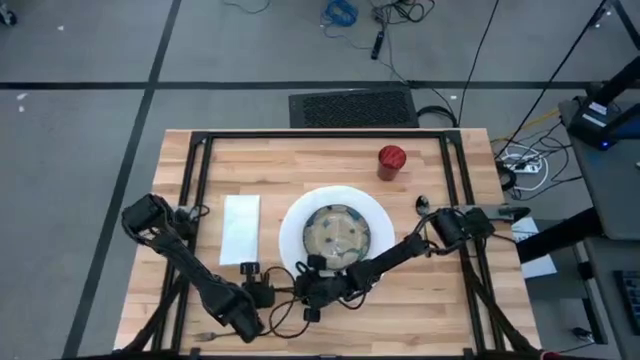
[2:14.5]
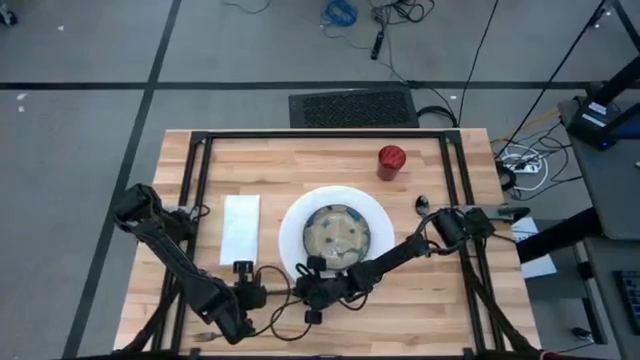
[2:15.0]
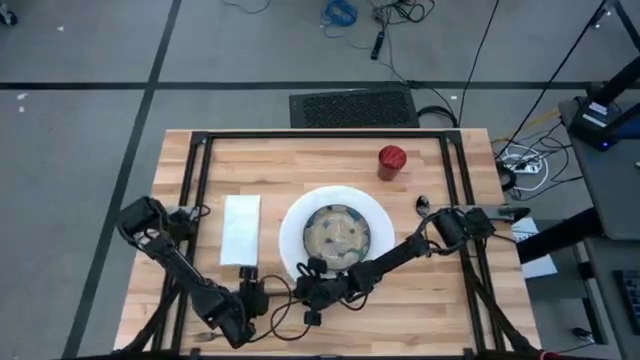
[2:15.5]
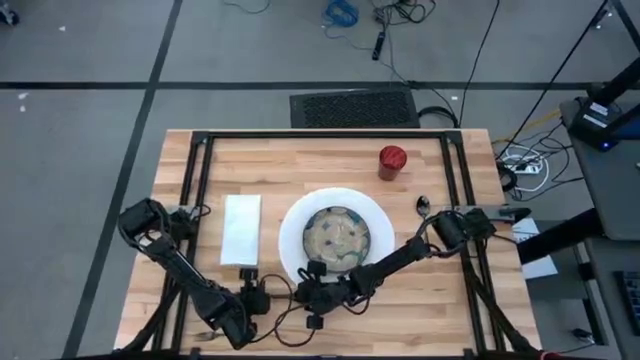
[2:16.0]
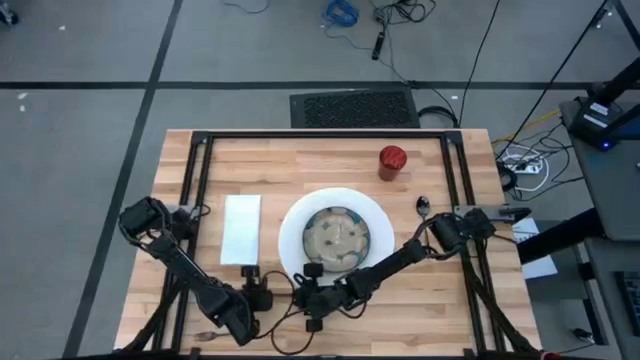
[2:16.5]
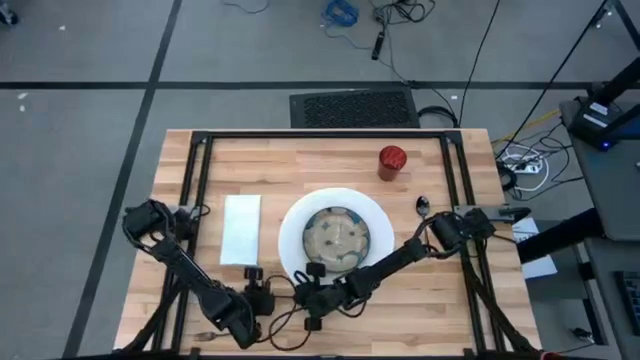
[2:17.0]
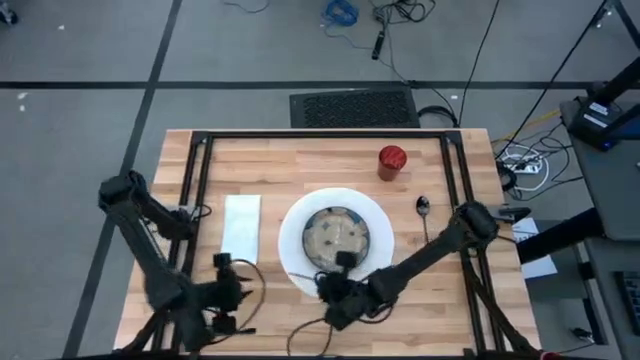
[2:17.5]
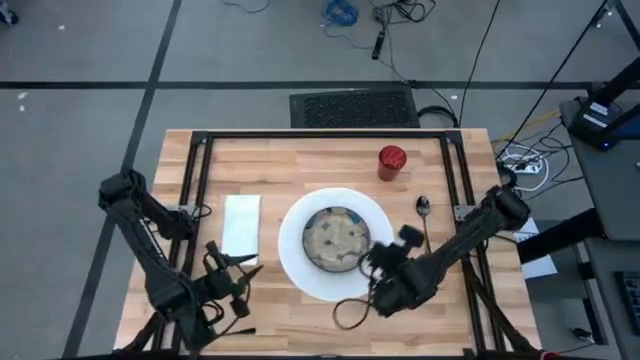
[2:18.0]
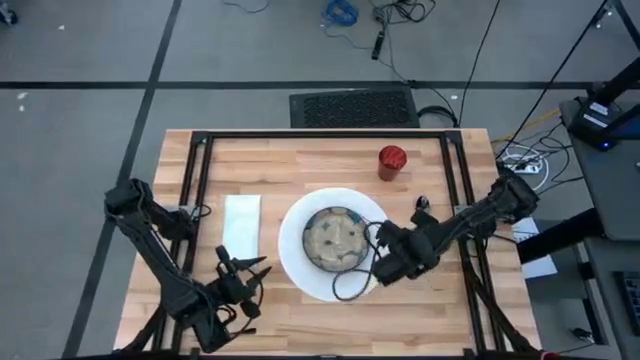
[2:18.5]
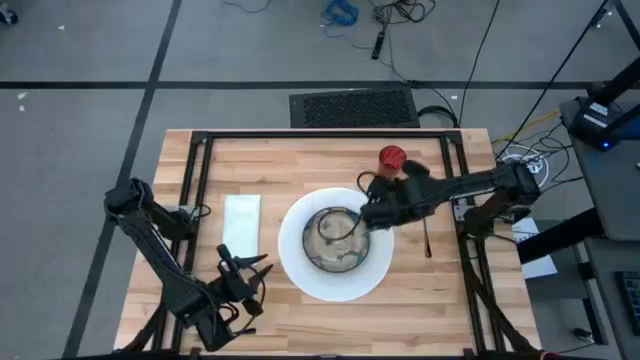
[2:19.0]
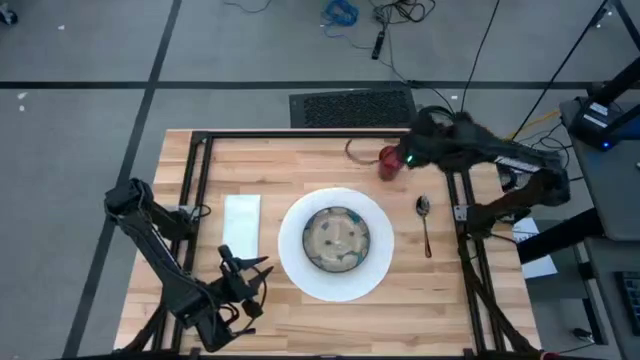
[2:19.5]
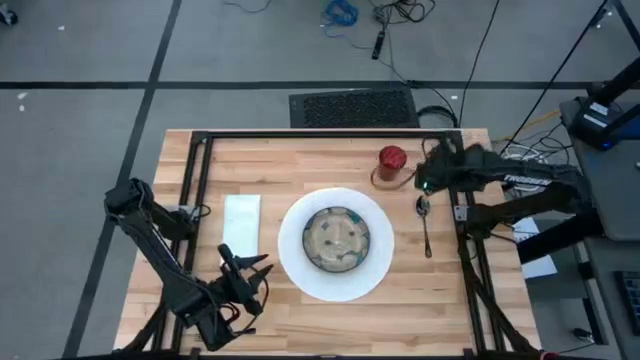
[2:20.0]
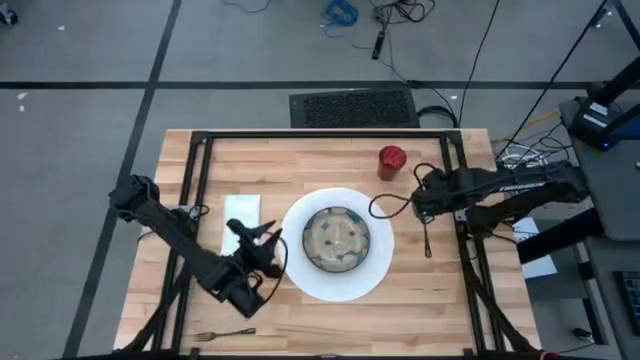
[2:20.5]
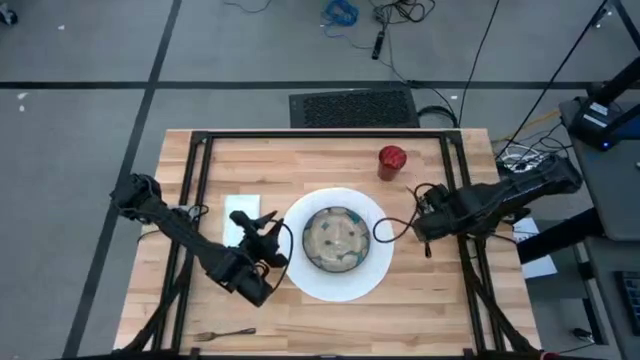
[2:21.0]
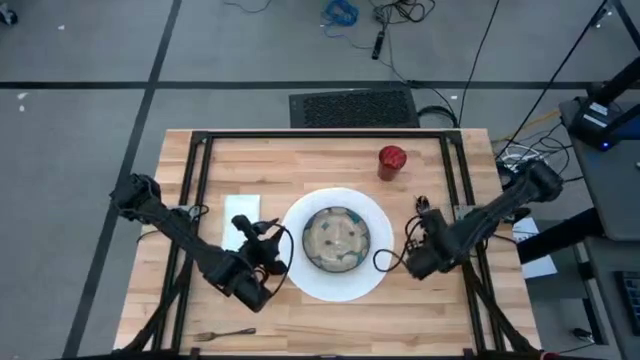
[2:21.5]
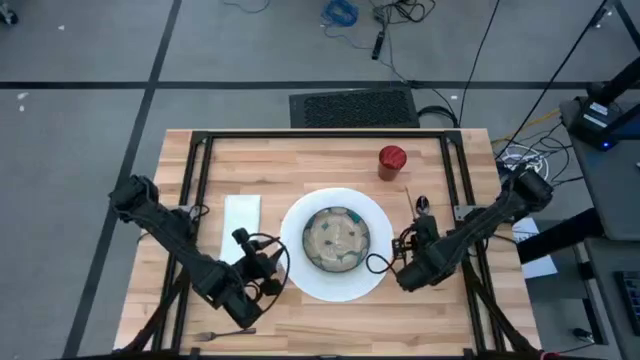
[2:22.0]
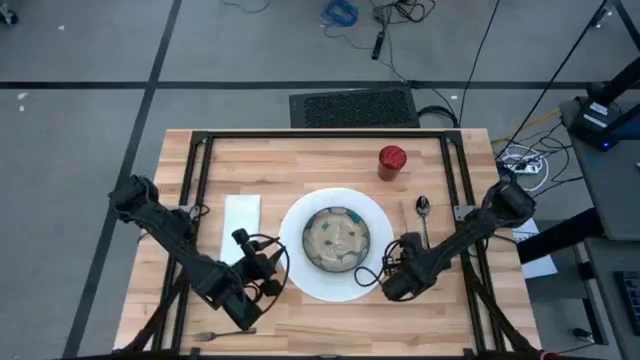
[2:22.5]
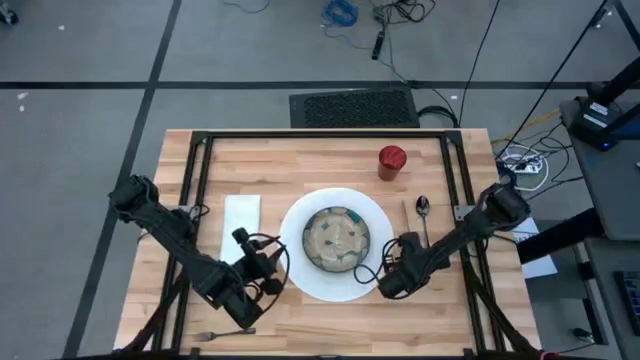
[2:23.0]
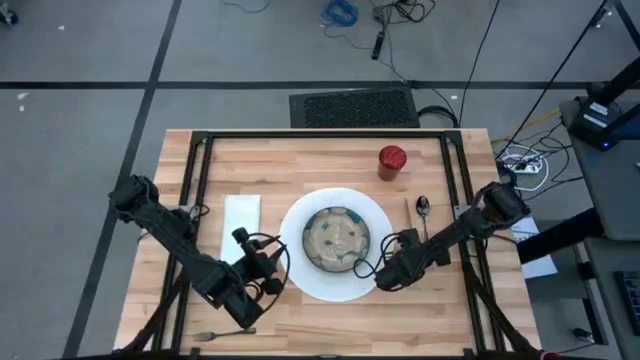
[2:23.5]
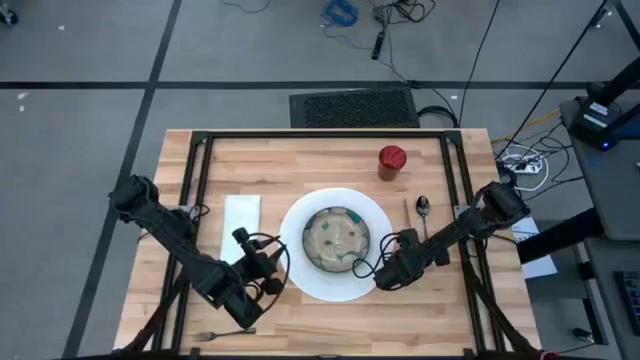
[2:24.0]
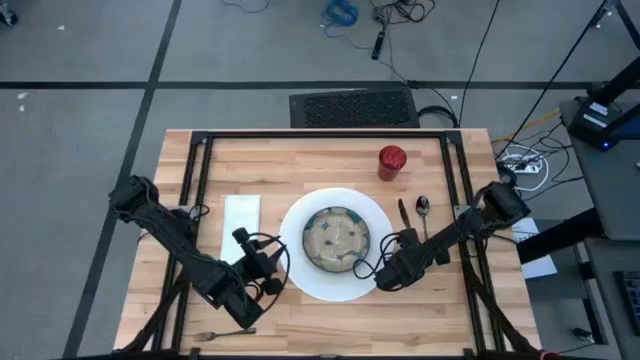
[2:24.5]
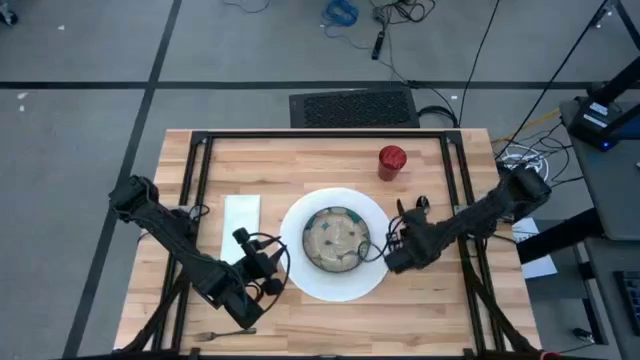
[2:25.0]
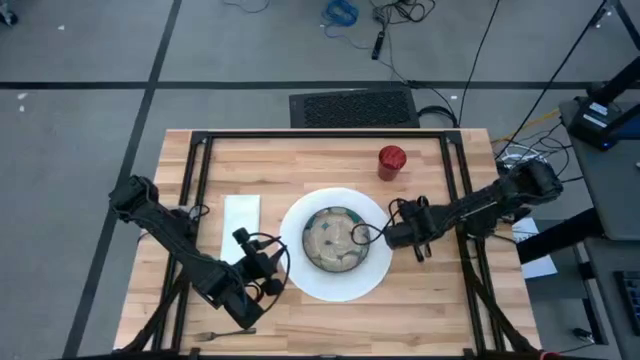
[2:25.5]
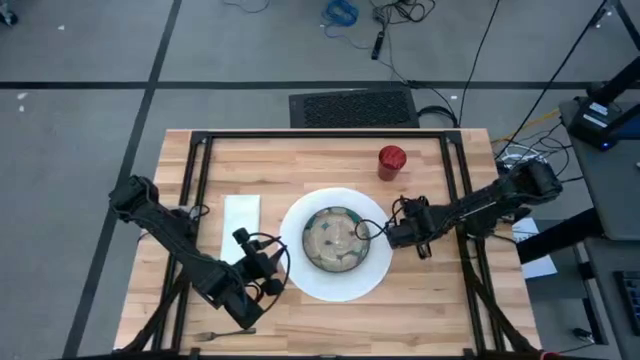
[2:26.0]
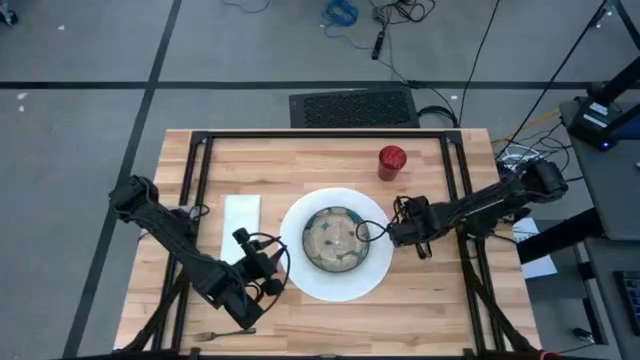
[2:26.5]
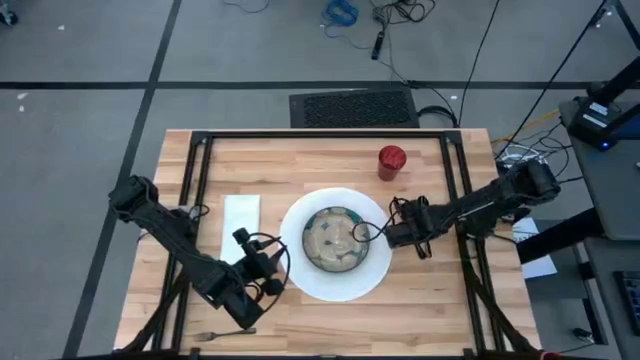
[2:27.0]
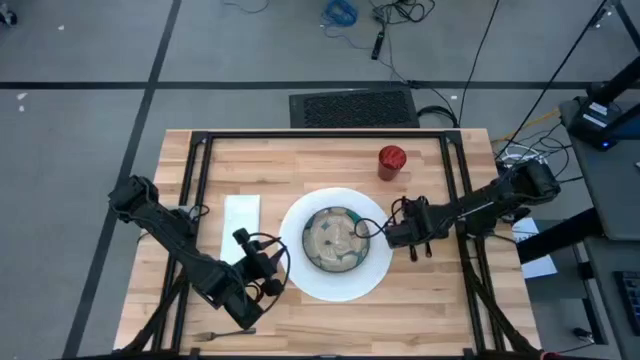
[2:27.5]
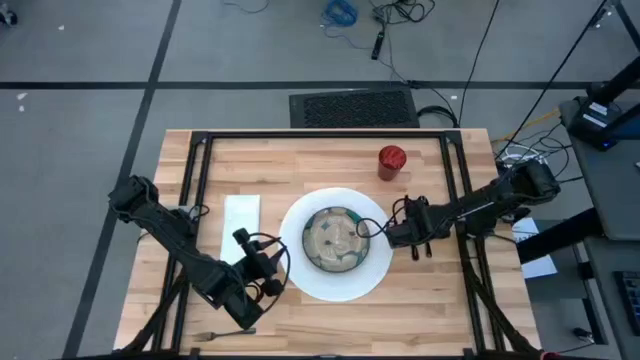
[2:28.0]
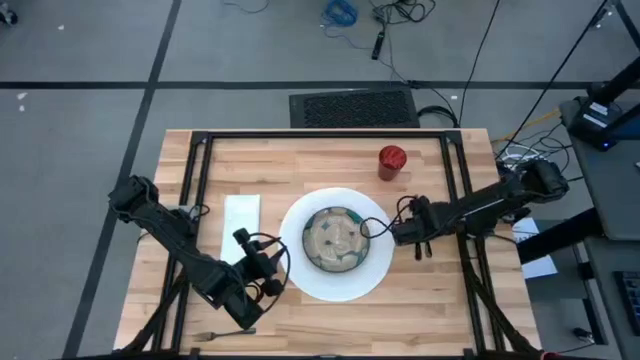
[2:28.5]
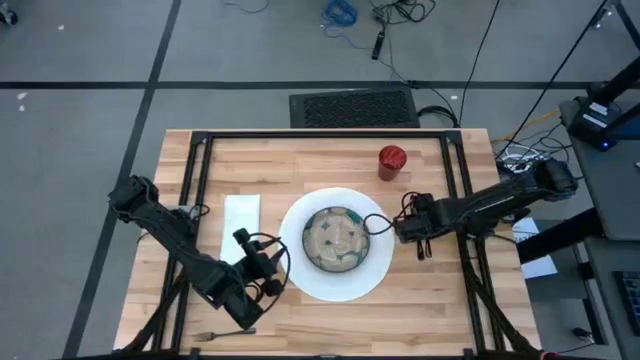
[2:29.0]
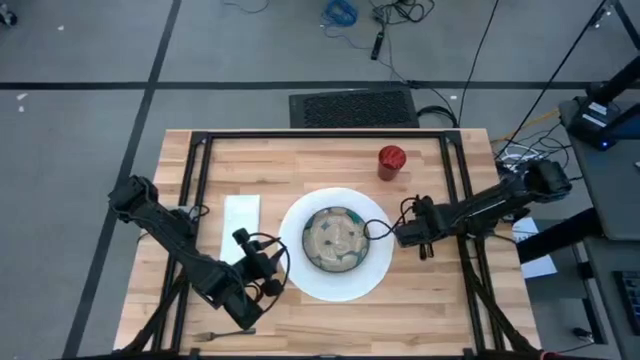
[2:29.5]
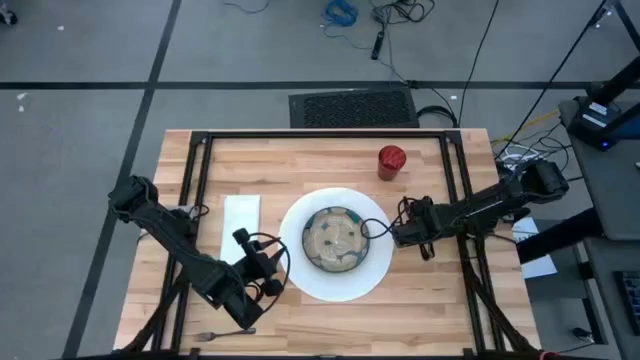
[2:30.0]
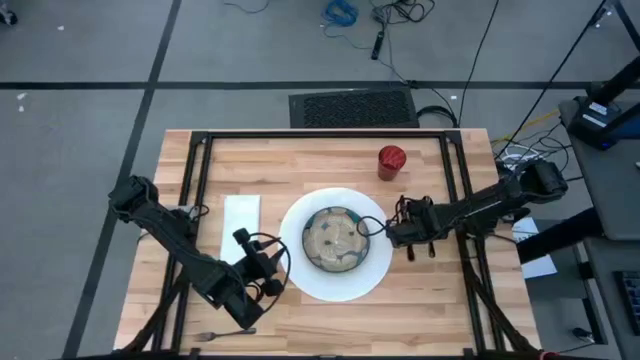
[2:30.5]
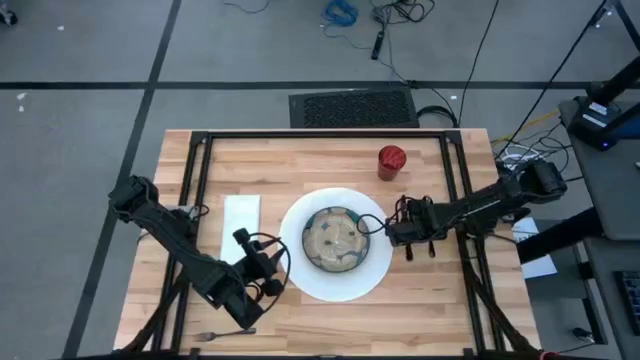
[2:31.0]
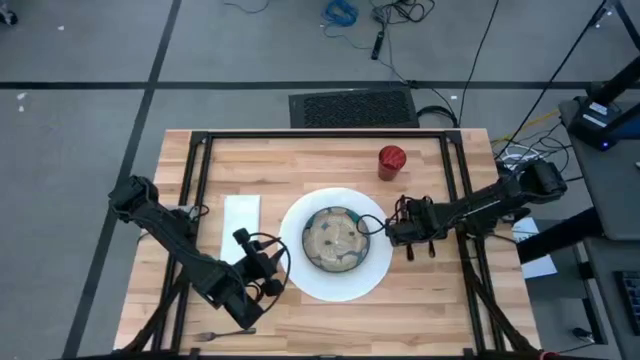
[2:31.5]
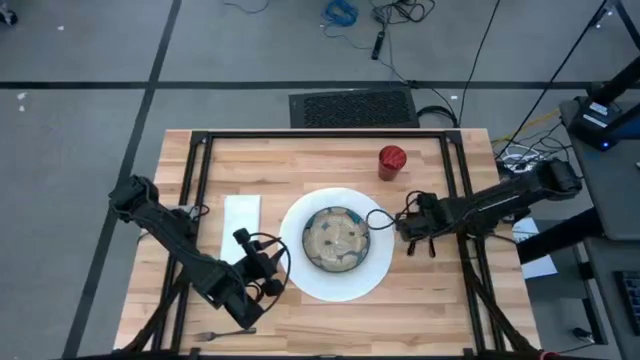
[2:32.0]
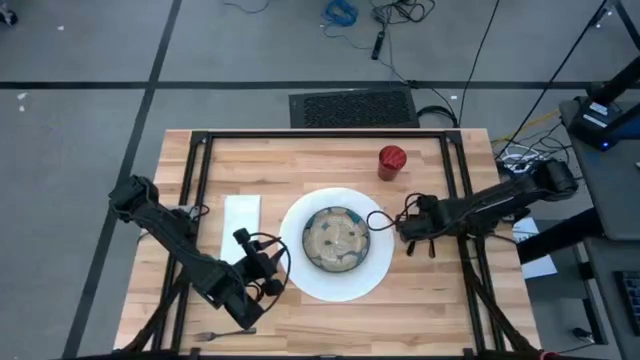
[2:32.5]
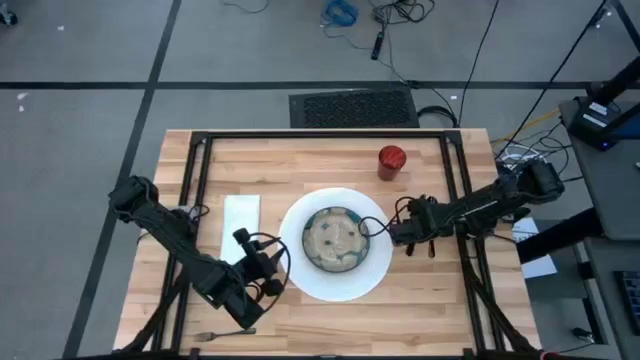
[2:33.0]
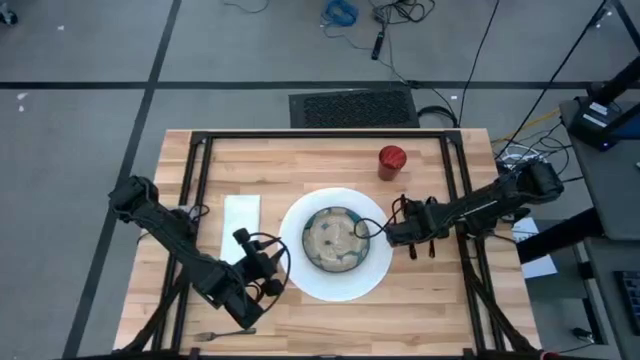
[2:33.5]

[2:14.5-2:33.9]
Task: Set table place
Move the black knife to the middle right of the table
